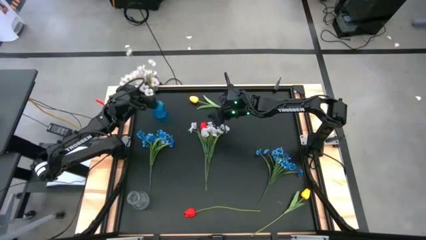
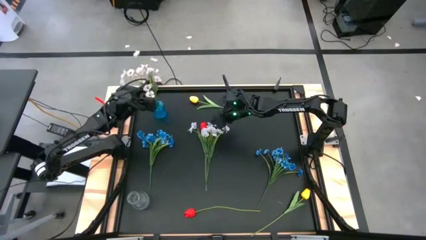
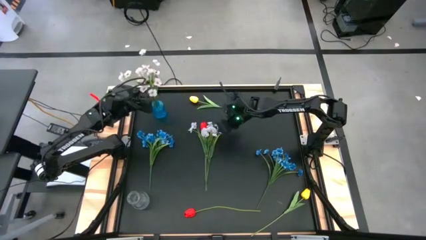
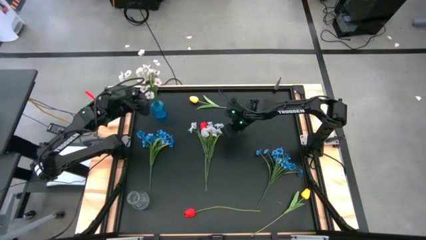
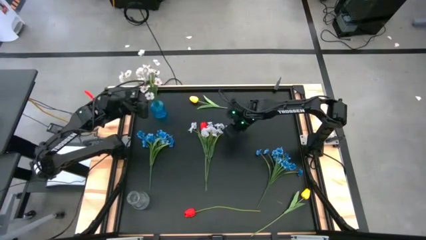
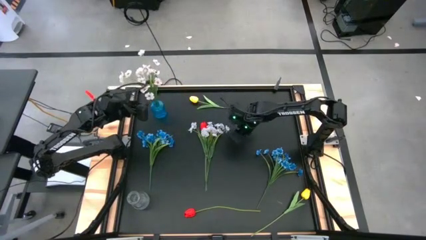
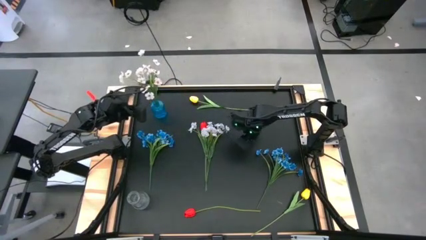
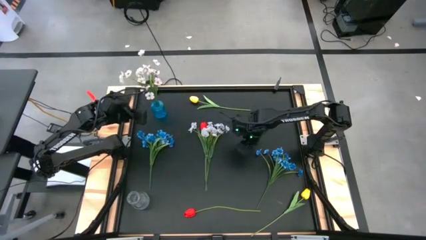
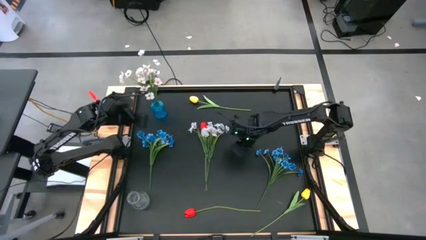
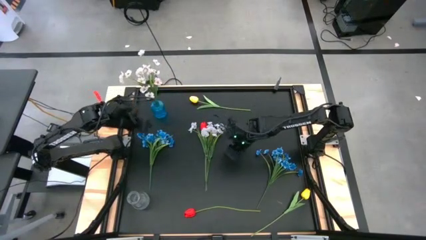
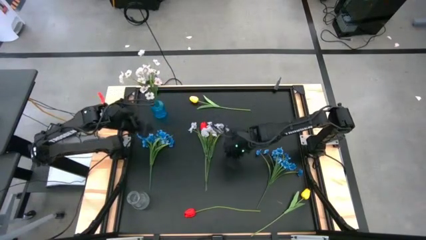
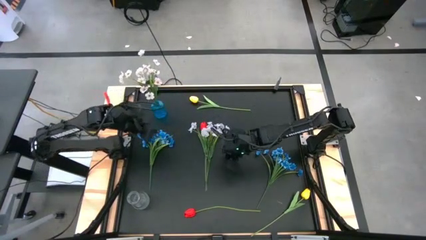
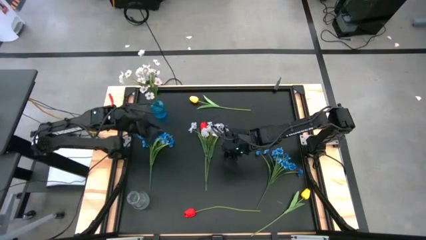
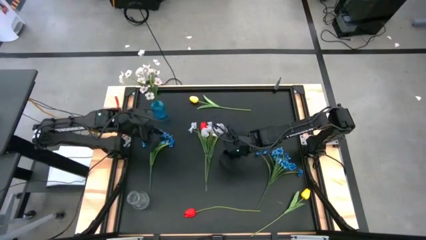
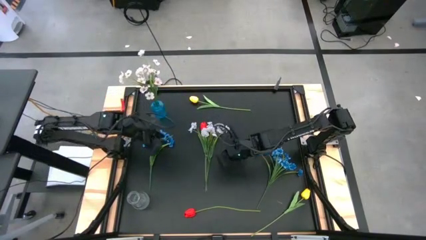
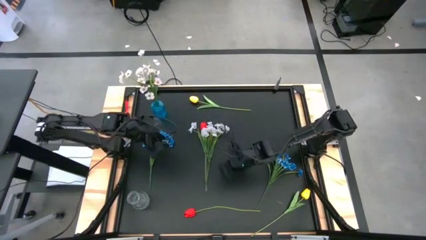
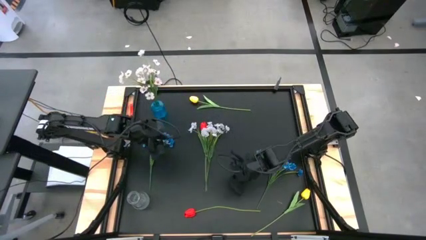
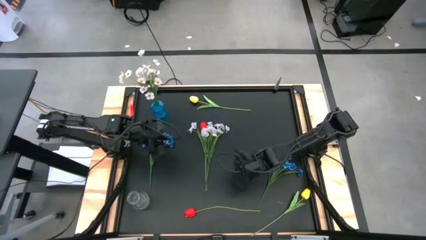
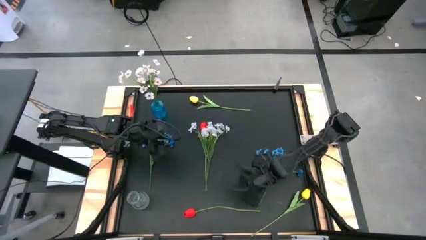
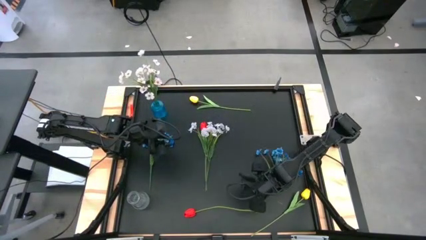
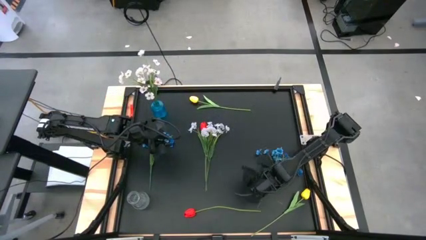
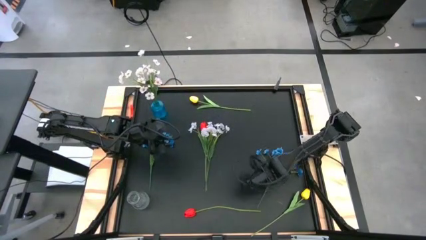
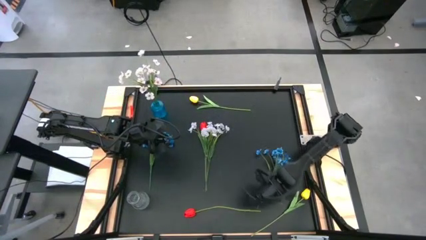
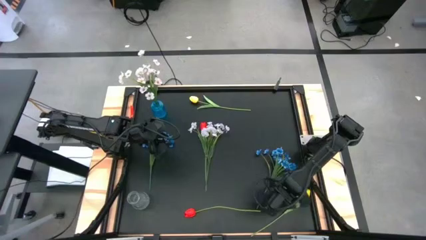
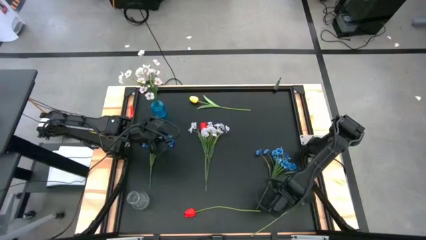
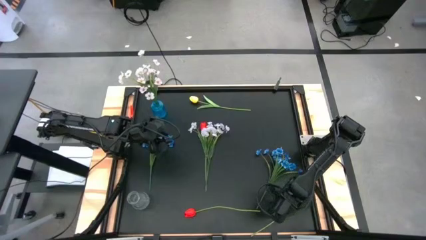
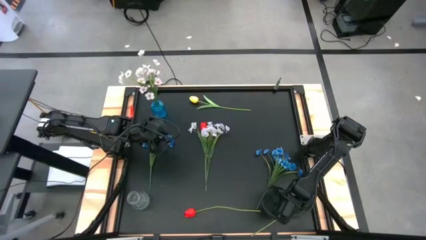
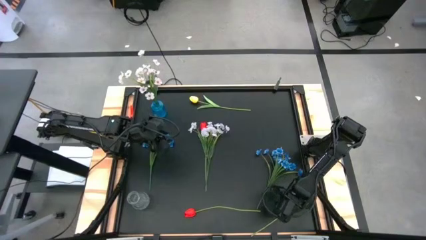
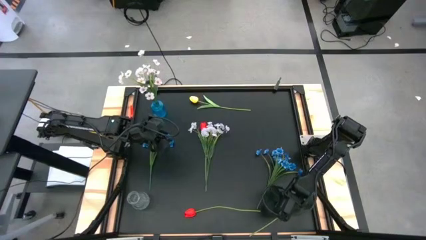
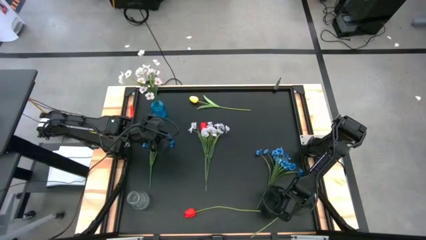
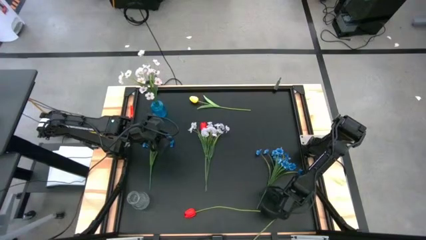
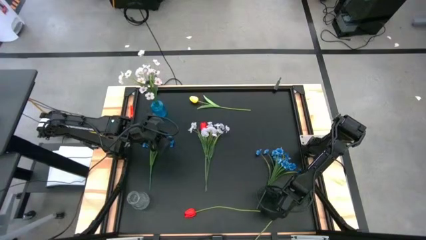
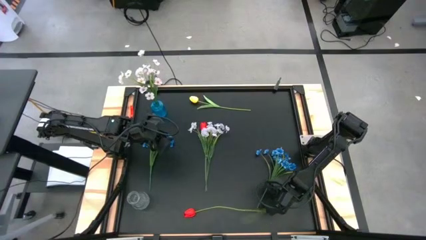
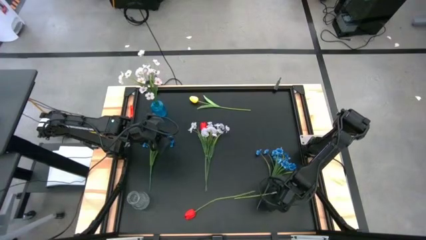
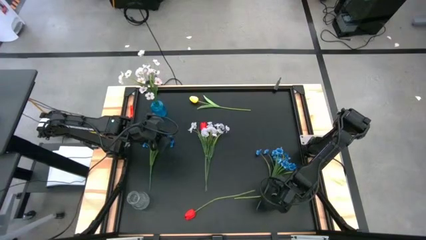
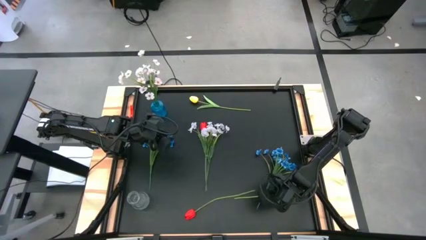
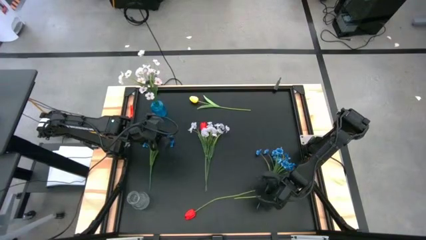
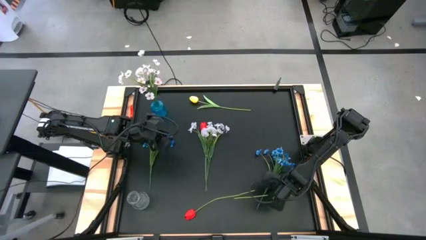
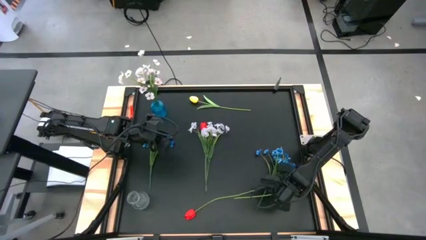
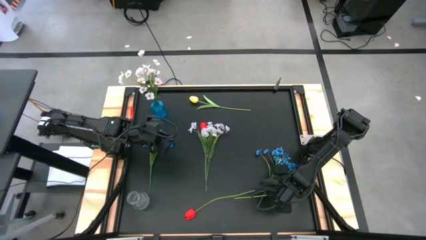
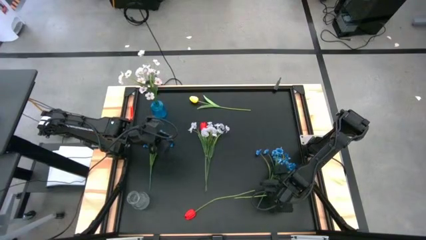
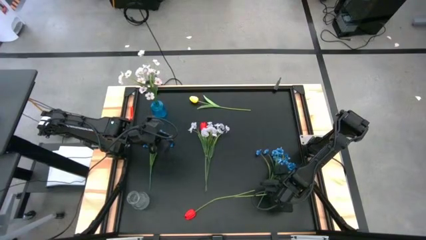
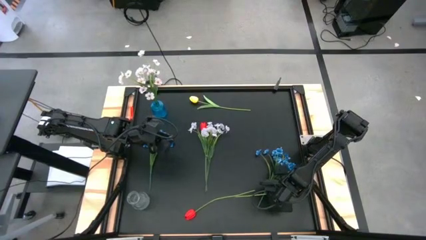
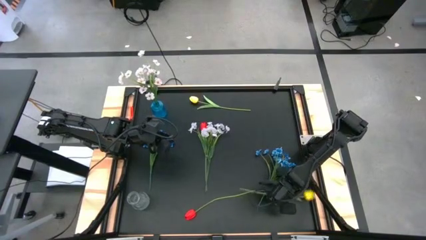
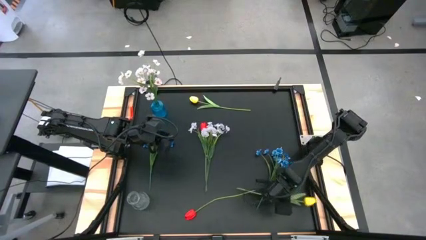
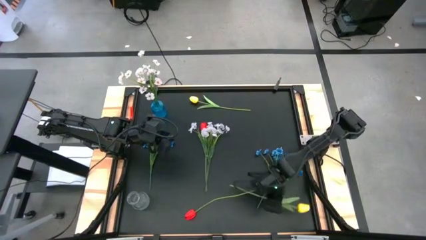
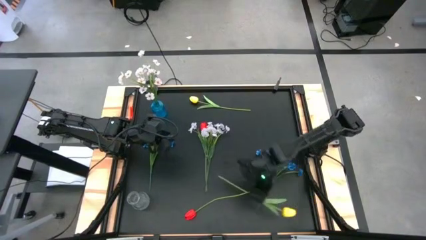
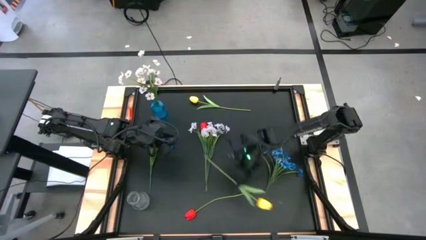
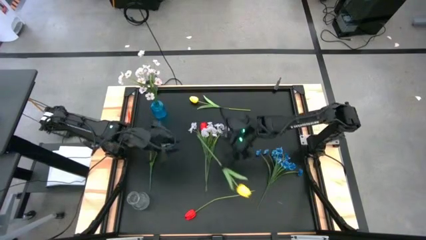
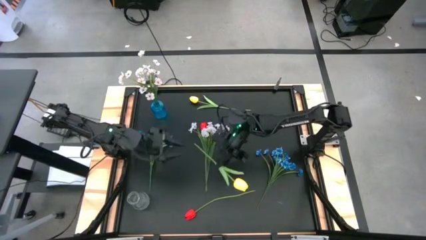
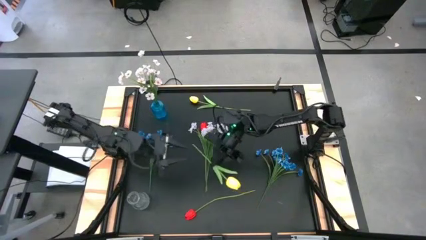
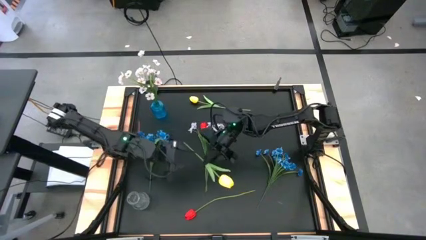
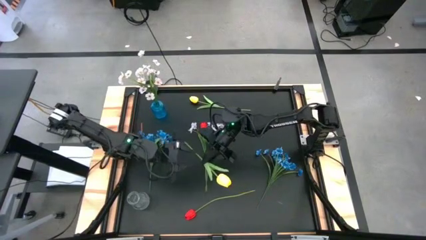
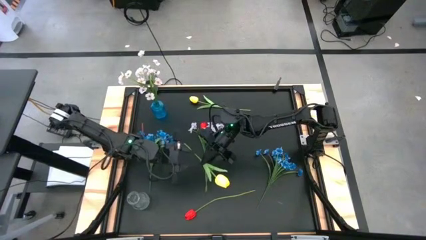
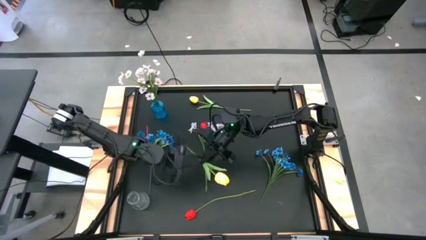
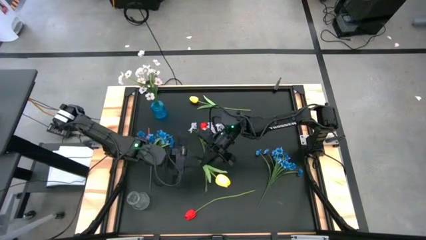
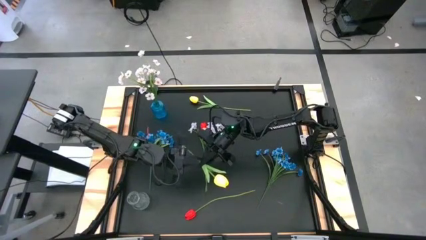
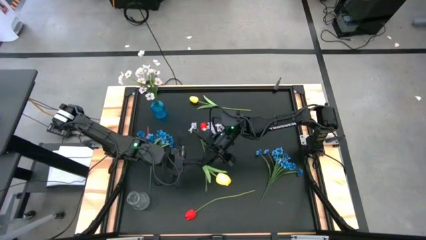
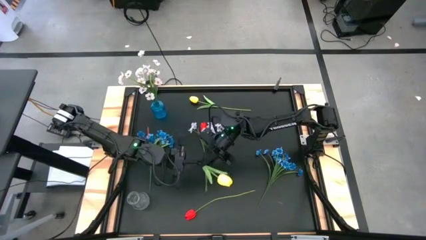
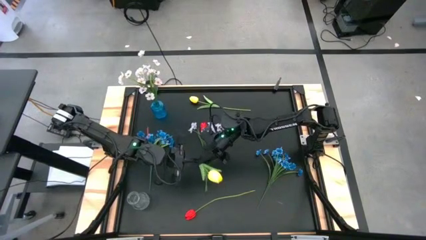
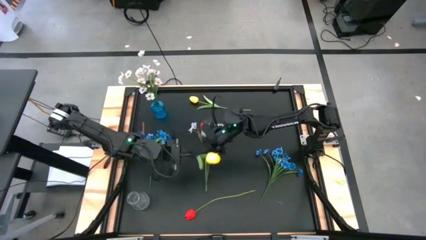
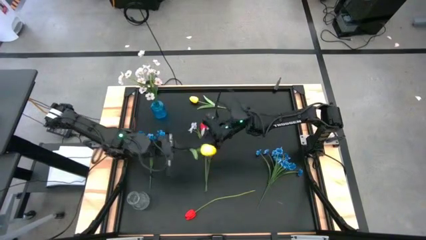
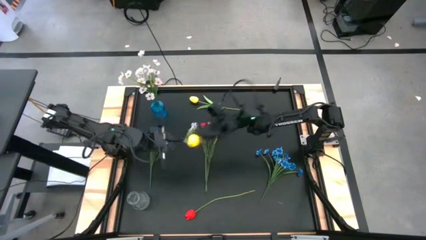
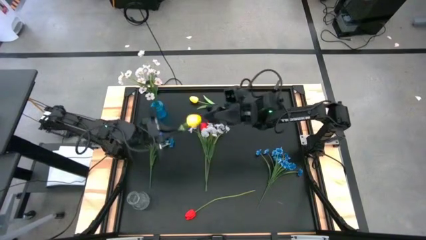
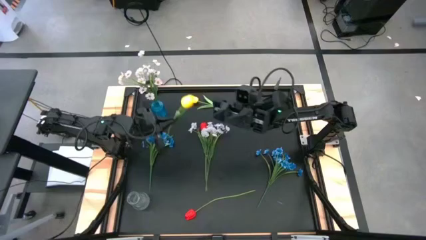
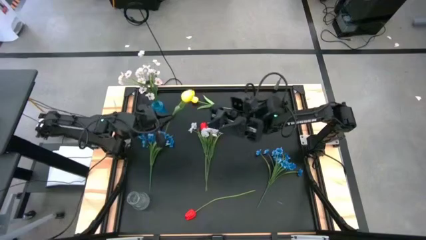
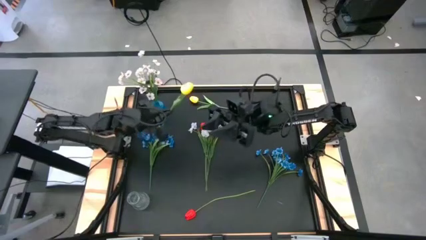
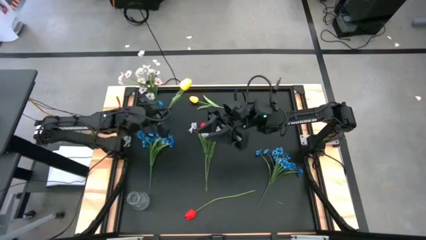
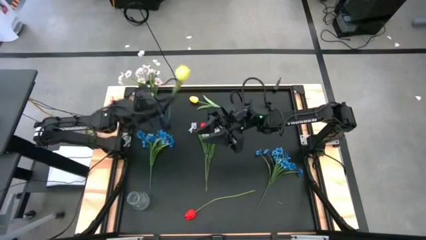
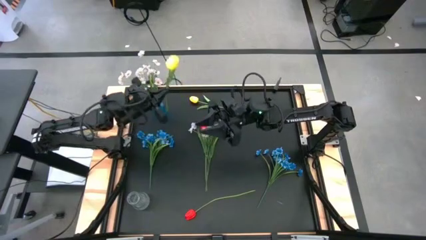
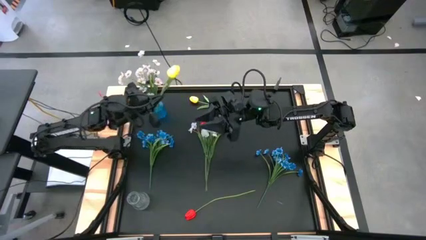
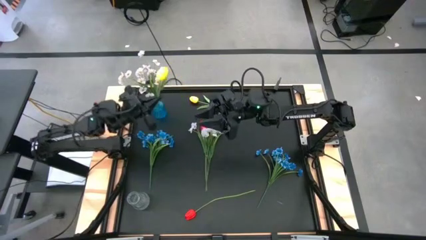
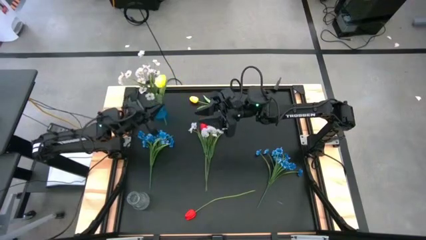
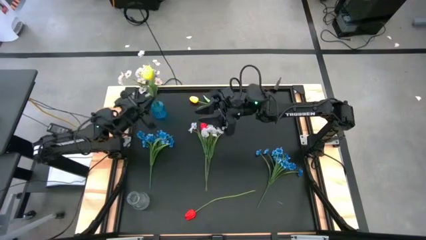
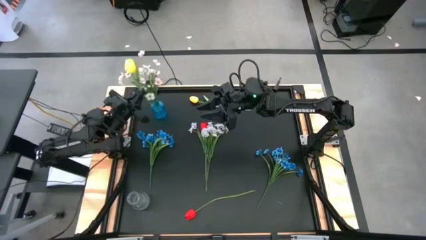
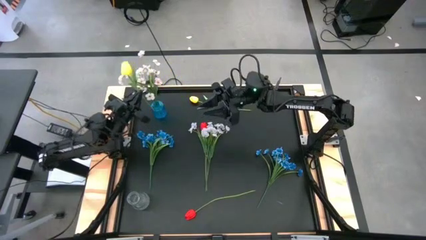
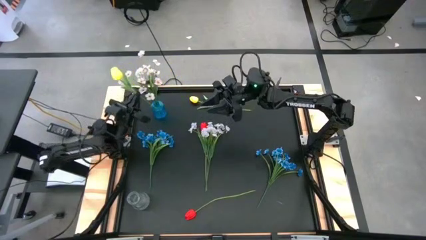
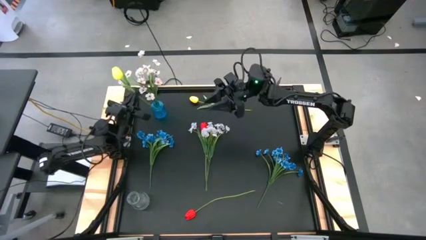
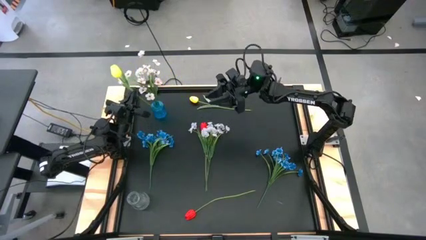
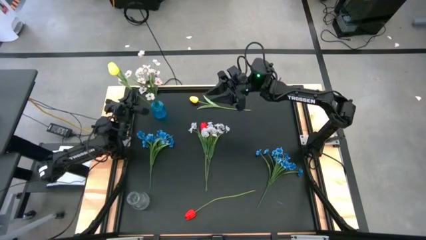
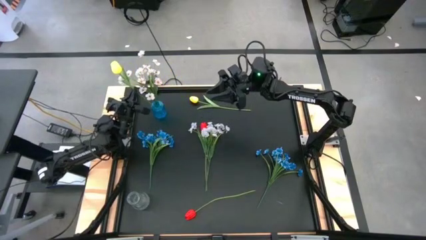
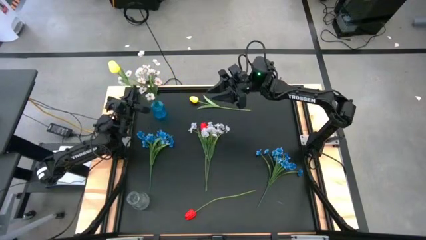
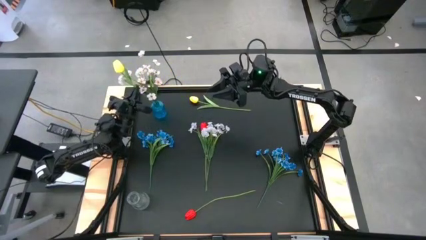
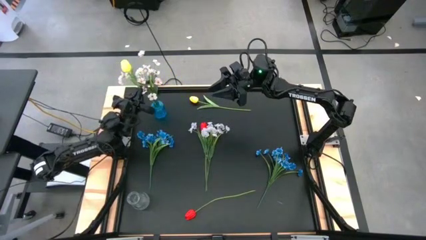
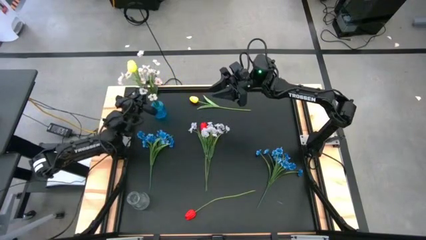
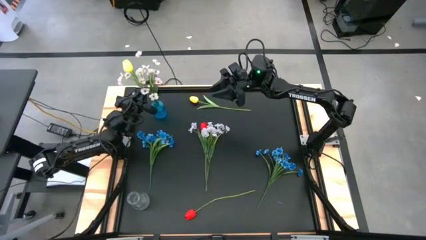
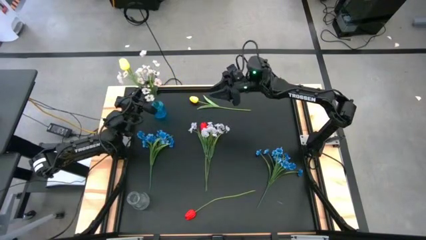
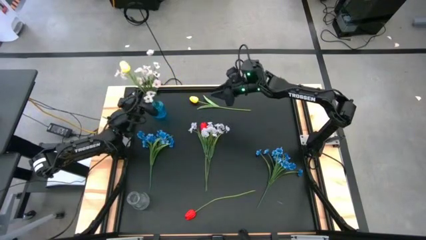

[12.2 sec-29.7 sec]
Task: Sort flowers into vase by color
Put the bottom yellow flower into the blue vase
